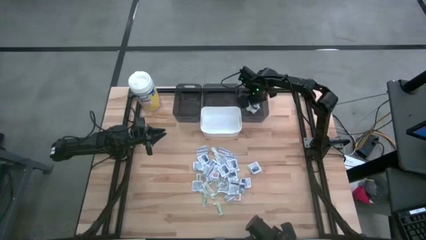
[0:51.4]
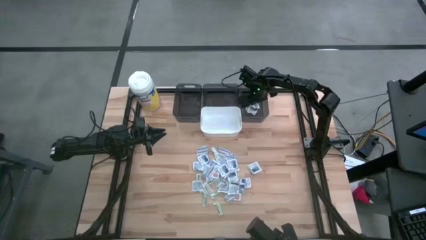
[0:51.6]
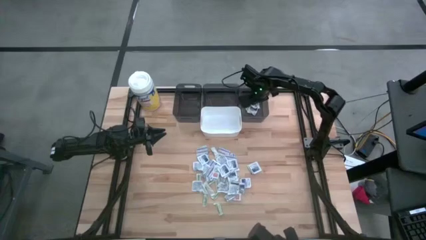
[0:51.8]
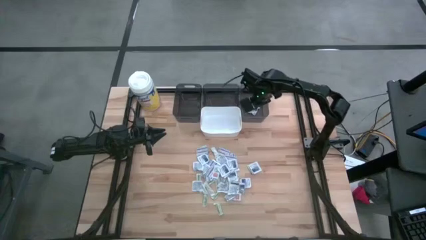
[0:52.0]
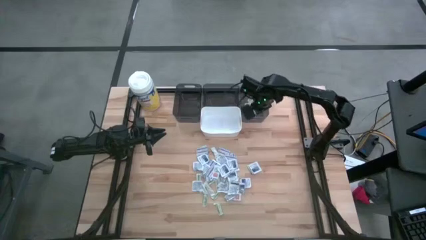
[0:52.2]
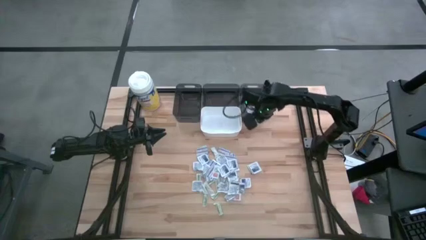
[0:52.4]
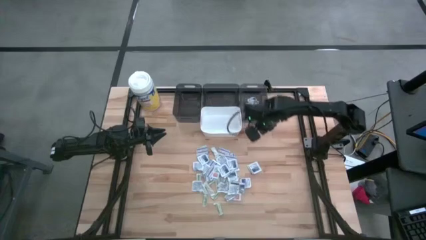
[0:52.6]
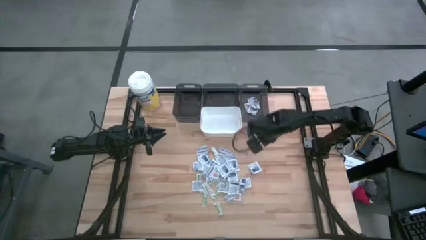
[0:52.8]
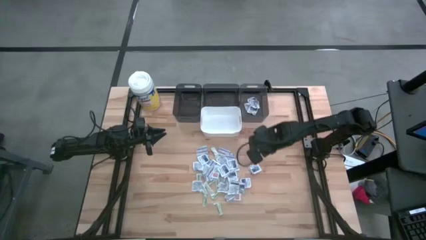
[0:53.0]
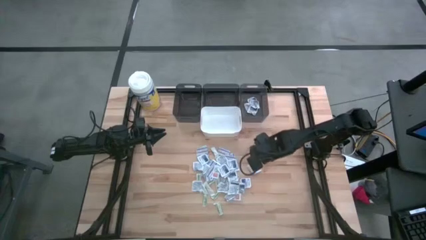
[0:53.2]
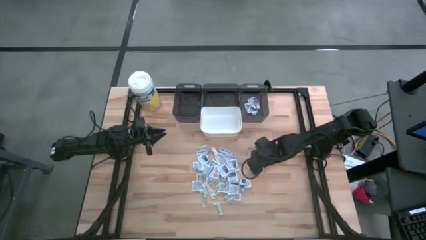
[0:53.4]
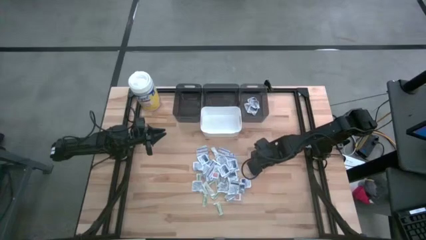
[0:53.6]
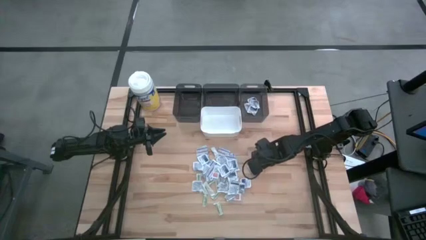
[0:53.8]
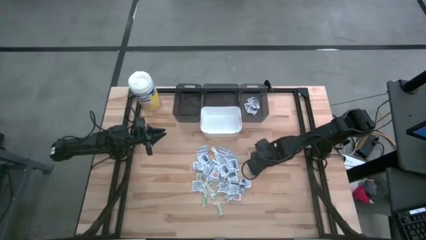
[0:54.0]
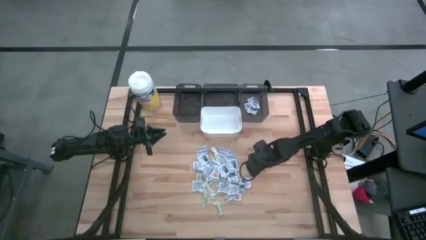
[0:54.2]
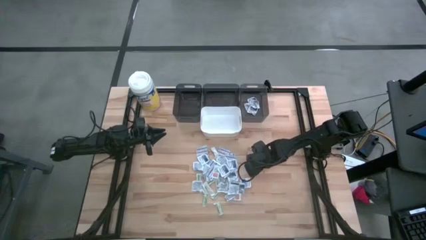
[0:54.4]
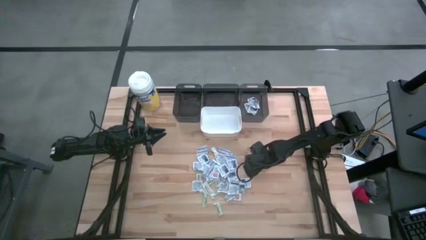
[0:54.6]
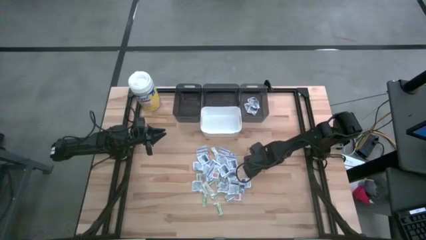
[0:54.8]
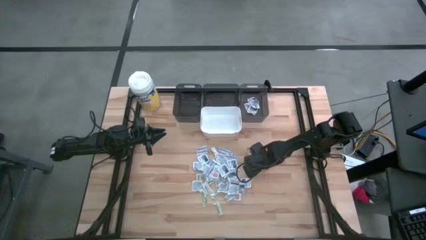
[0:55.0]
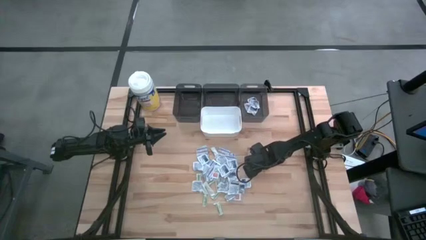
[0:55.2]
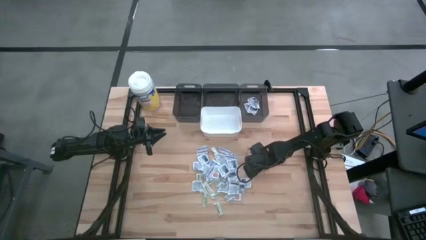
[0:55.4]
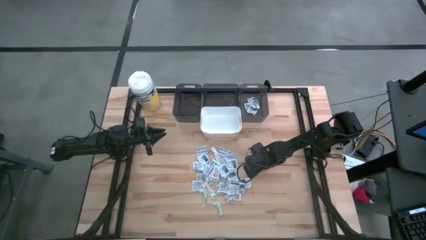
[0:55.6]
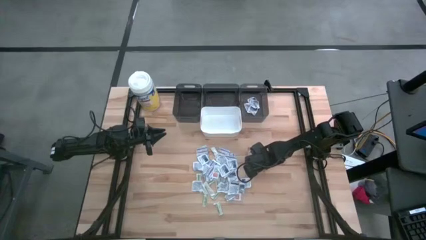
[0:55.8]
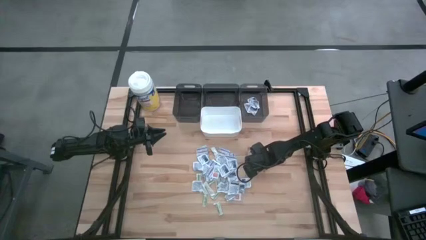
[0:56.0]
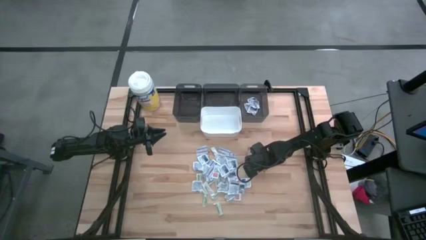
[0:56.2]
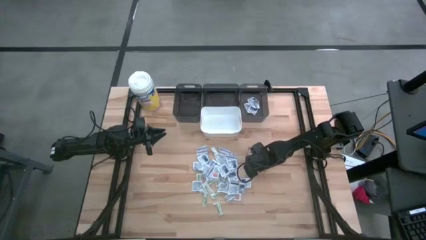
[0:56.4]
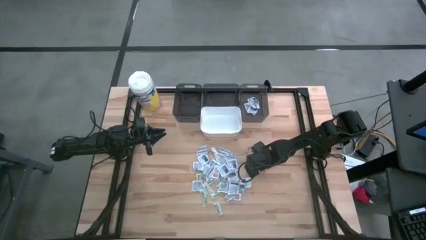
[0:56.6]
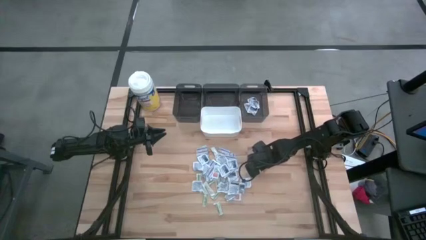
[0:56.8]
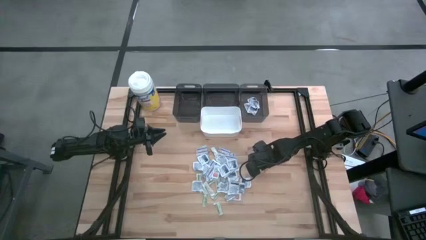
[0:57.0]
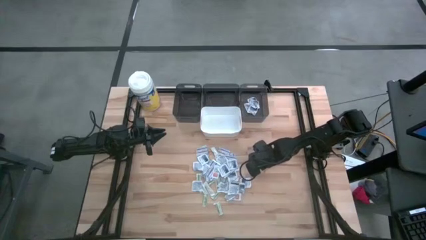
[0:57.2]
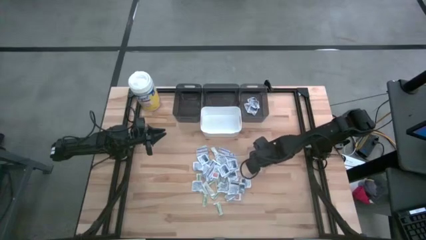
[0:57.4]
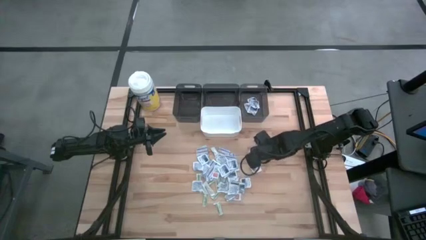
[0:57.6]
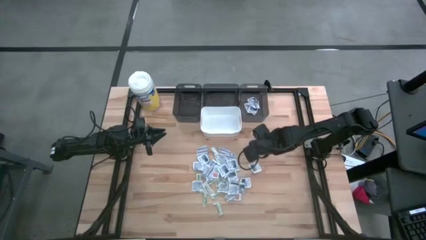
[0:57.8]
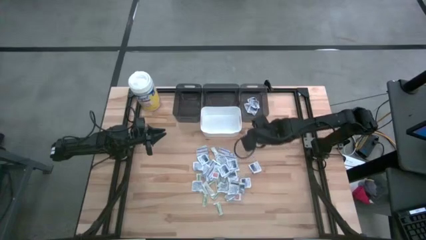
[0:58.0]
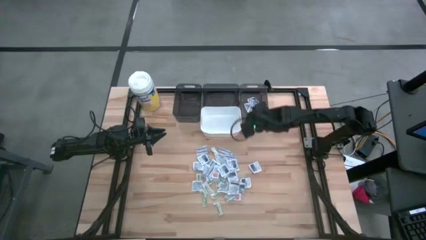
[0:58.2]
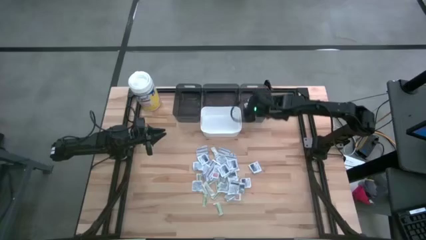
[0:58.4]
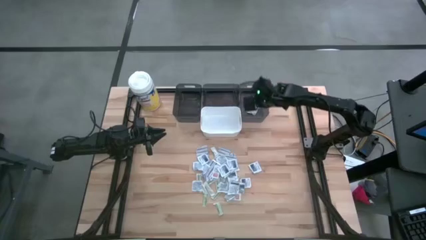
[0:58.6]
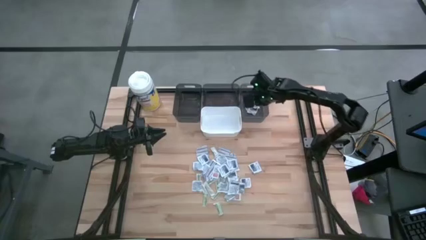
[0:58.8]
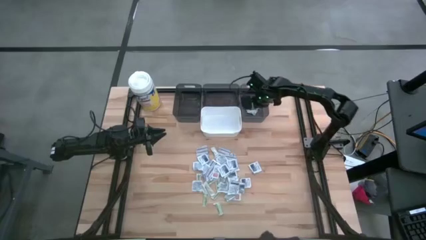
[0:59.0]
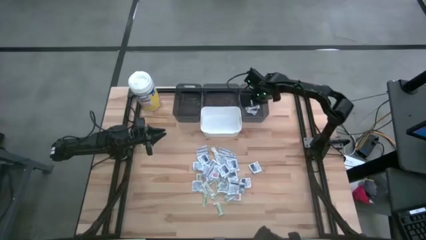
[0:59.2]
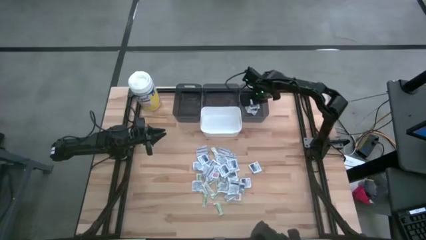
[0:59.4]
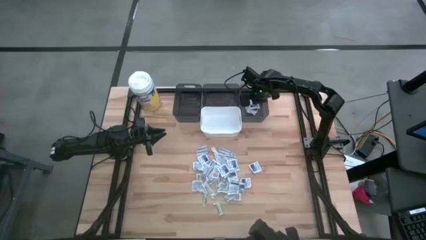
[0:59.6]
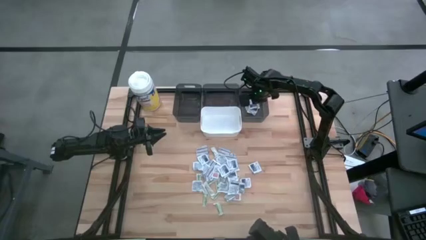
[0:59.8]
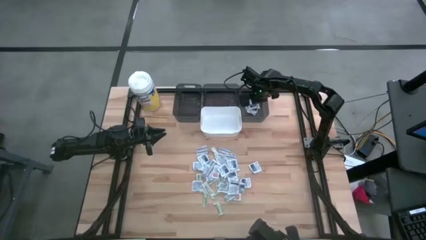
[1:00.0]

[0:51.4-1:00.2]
Task: Pick & Place First Aid Supplies
Put the blue alcohol pad into the right black bin

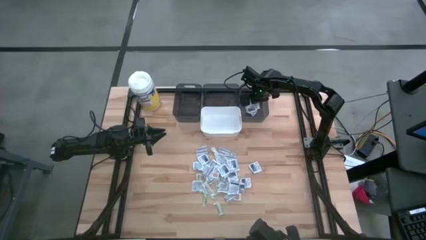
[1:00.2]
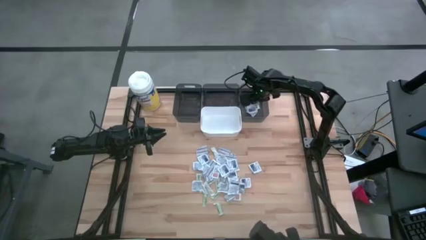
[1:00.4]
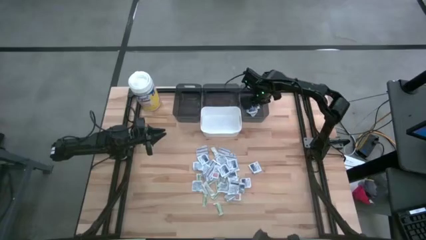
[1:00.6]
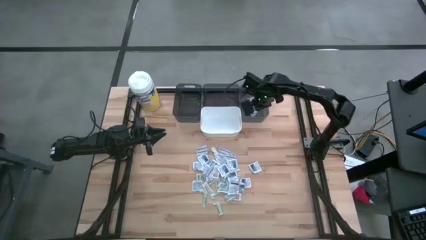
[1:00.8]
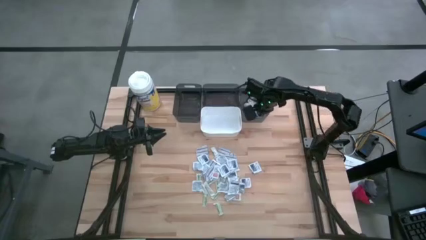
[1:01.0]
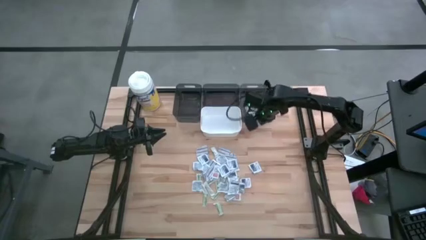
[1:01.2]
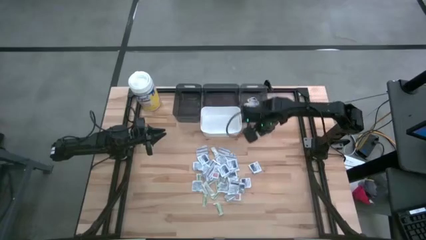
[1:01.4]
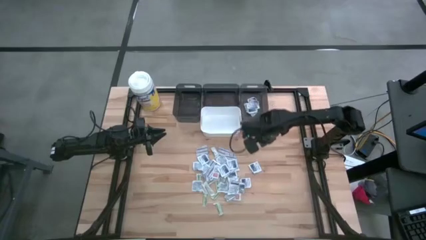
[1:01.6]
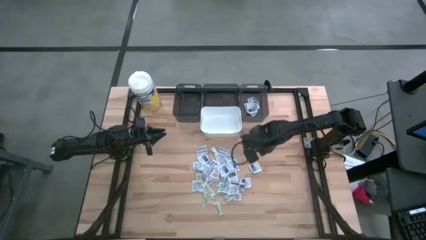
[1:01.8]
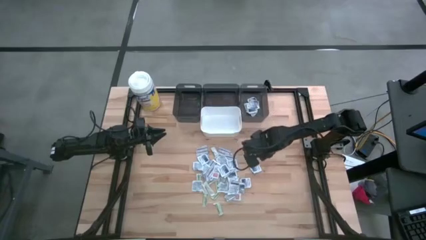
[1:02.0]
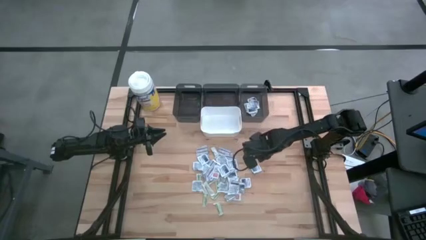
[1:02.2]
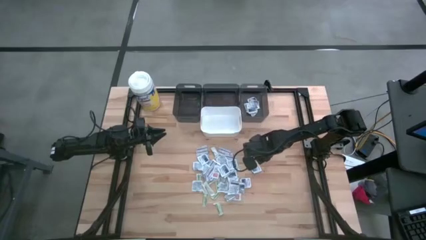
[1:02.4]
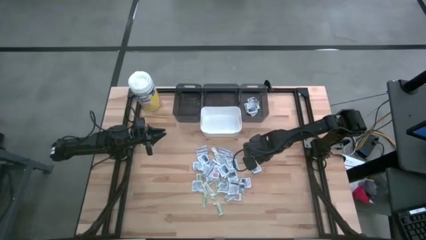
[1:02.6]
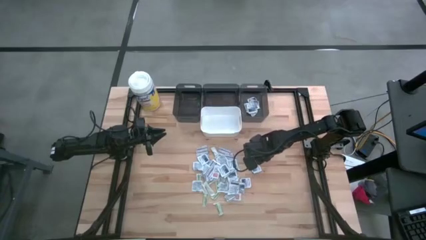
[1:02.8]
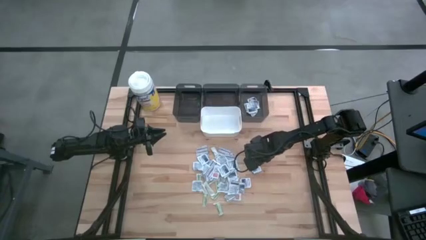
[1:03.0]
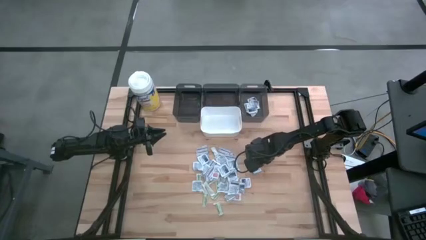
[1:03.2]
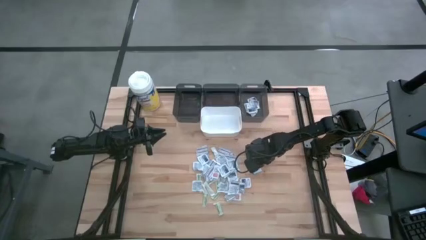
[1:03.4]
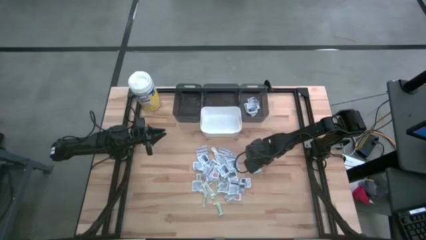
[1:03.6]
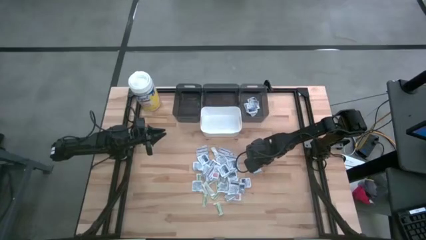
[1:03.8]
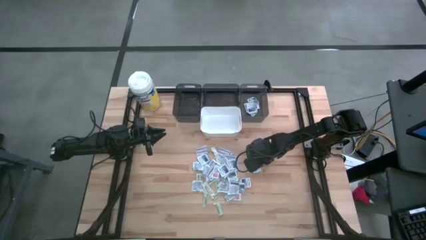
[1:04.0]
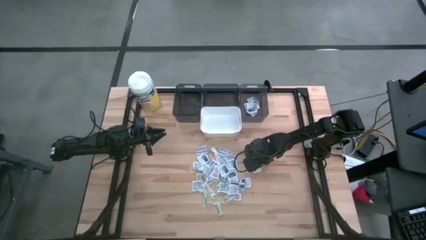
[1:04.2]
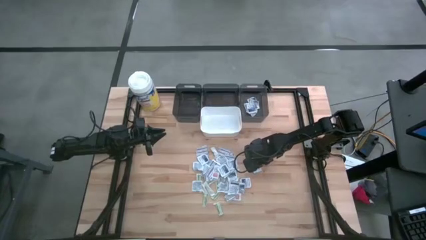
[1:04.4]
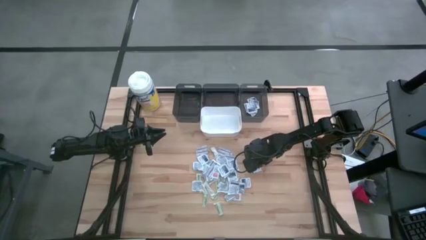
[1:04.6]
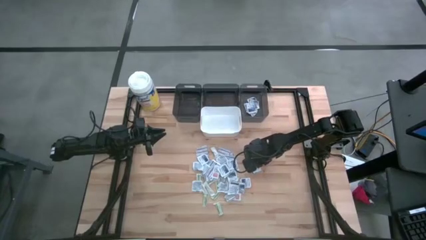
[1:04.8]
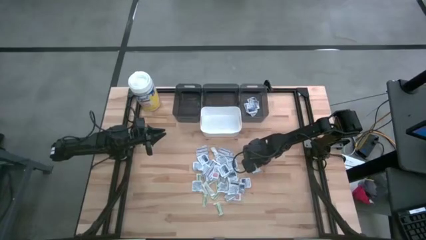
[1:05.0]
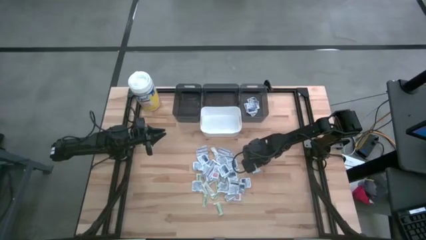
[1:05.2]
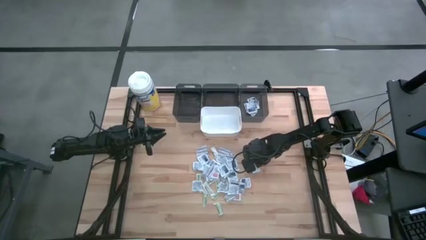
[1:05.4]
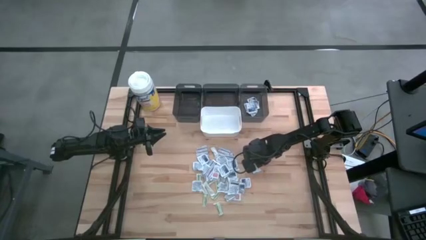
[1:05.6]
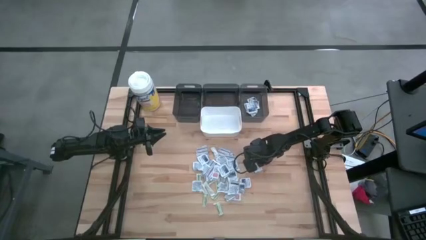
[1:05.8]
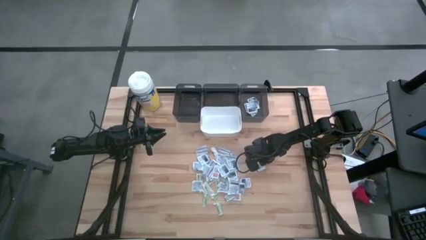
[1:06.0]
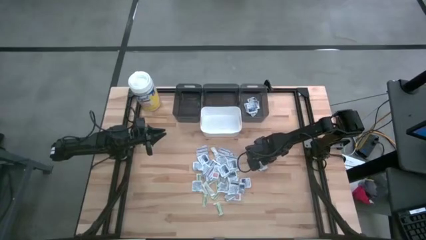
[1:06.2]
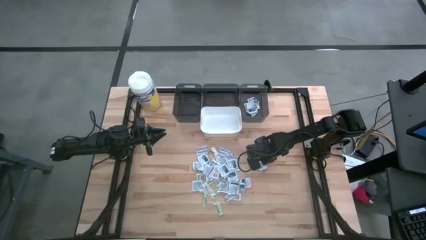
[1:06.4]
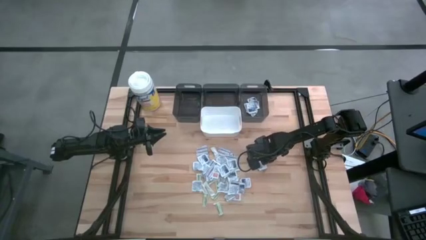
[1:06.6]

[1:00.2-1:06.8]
Put the blue alcohol pad into the right black bin

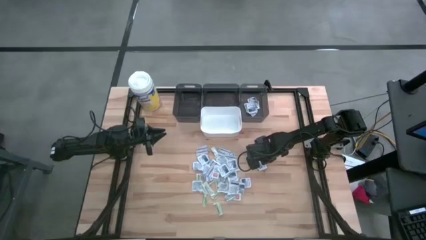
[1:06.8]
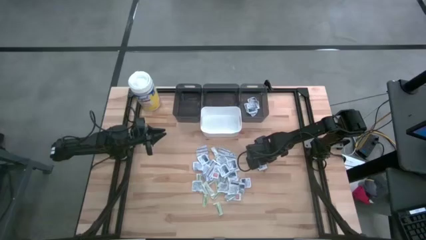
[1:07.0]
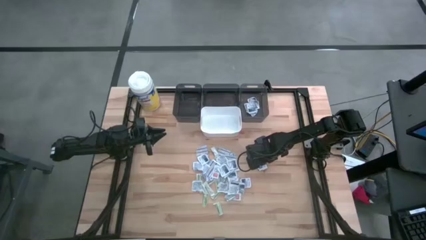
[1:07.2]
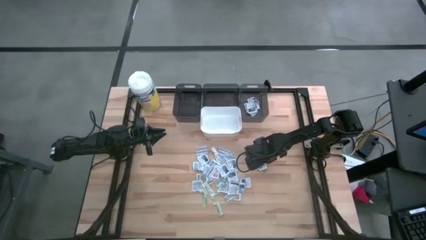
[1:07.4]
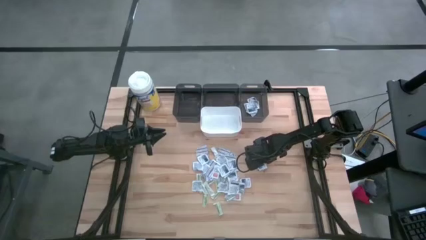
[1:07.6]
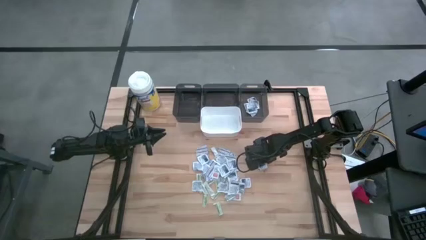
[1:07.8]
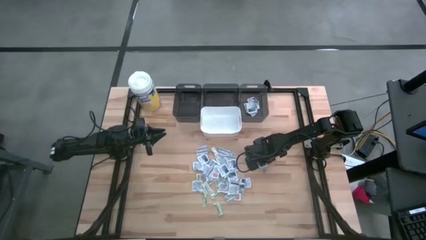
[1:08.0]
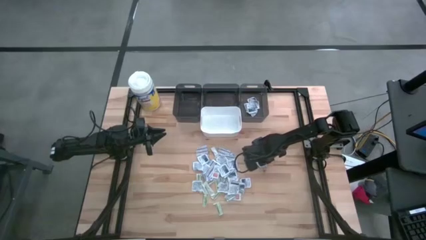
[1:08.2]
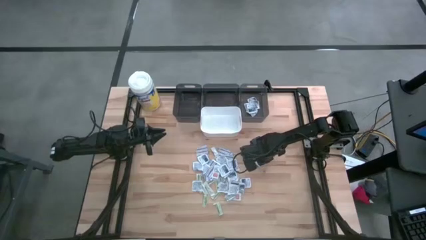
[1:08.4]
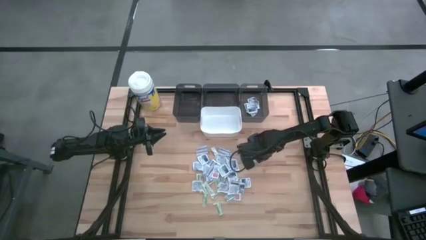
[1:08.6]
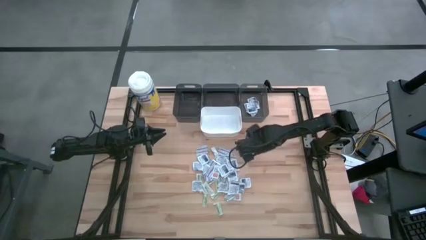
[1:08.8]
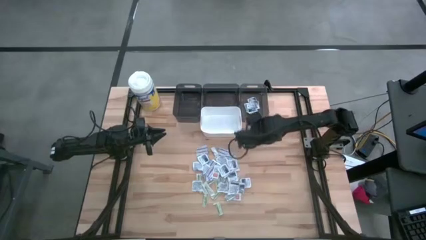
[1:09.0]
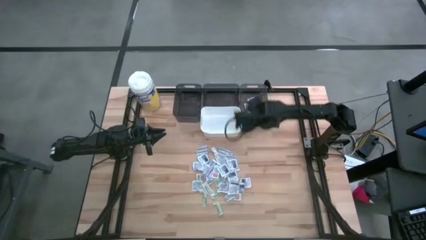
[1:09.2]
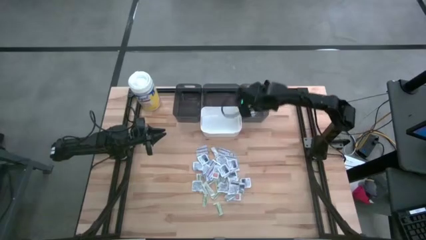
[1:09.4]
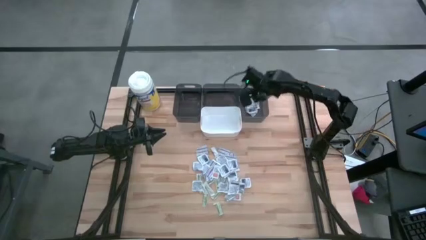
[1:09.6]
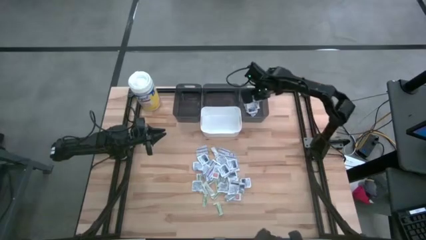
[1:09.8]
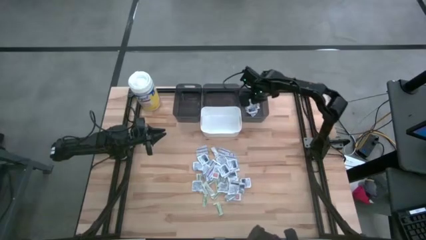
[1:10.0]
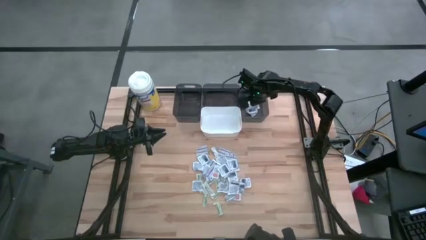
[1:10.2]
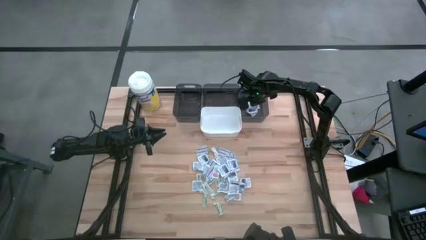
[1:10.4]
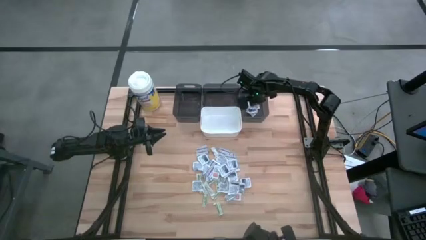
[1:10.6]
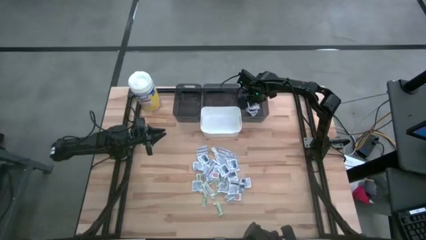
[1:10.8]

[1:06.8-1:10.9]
Put the blue alcohol pad into the right black bin
